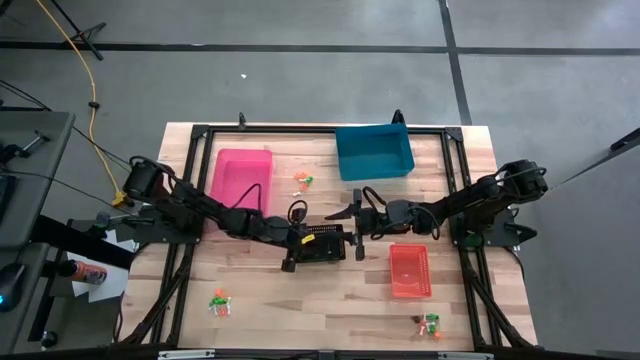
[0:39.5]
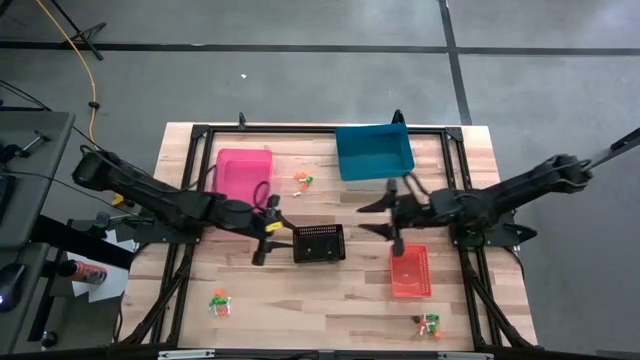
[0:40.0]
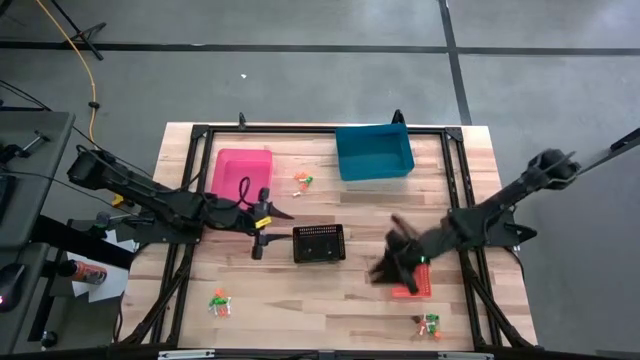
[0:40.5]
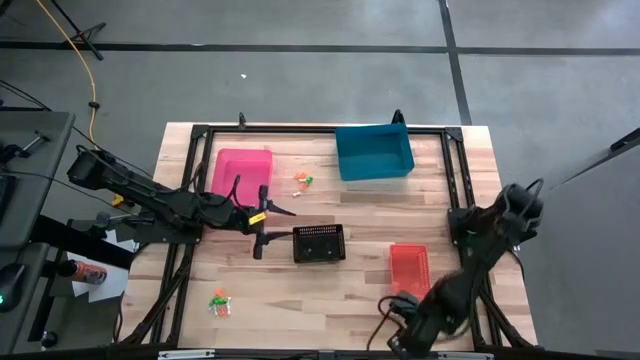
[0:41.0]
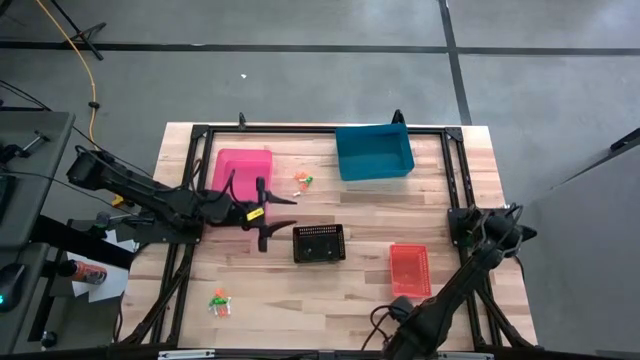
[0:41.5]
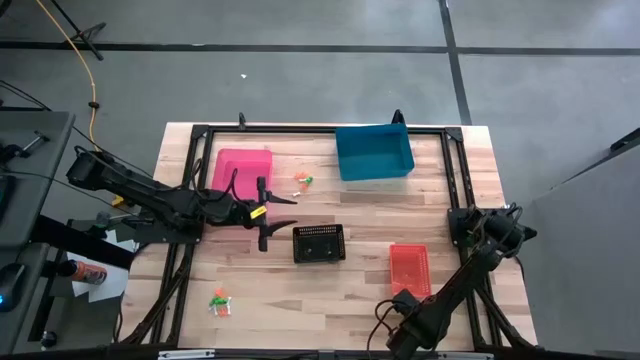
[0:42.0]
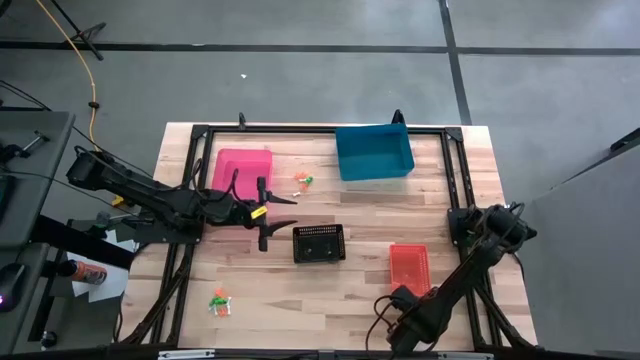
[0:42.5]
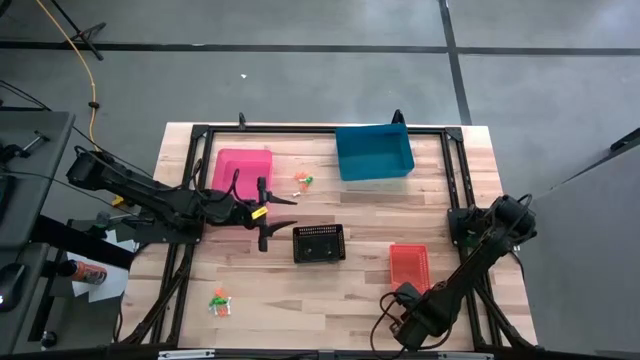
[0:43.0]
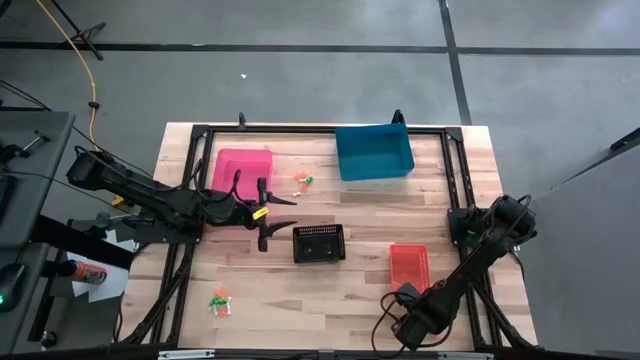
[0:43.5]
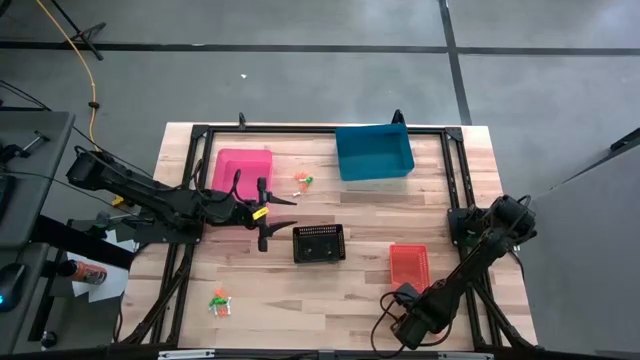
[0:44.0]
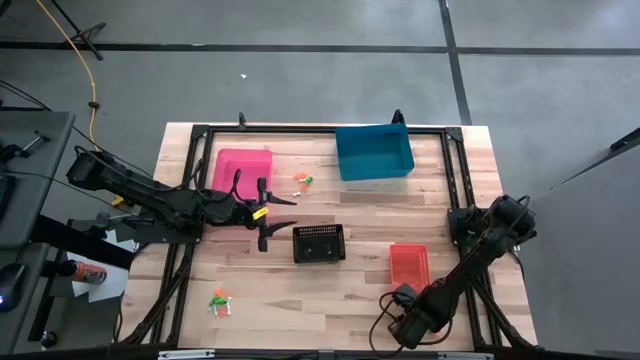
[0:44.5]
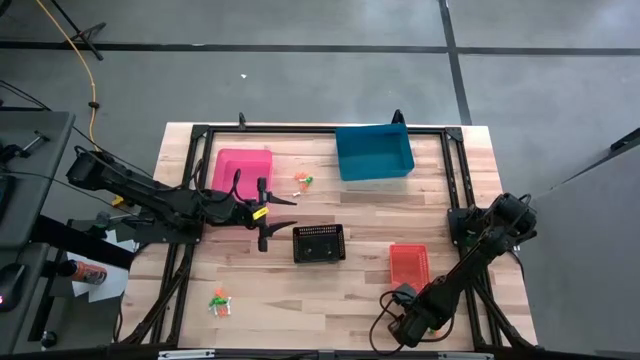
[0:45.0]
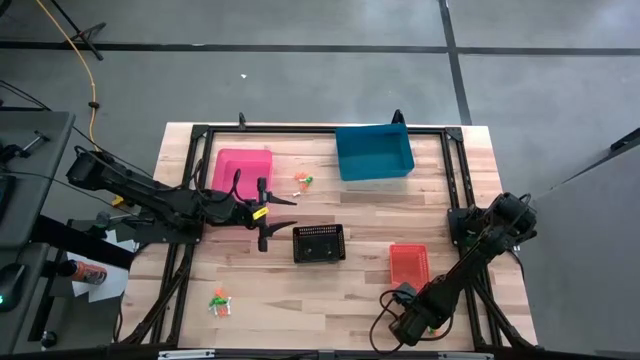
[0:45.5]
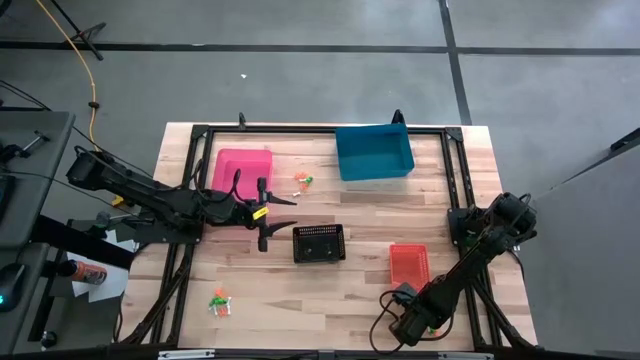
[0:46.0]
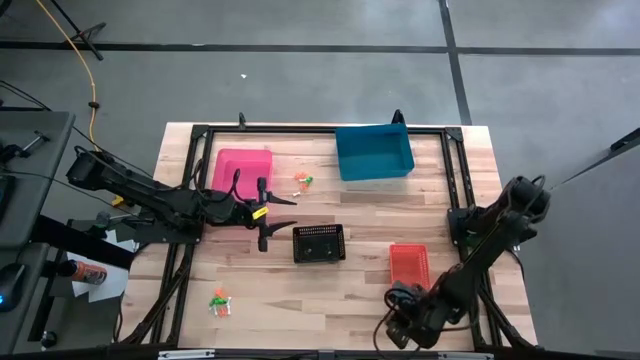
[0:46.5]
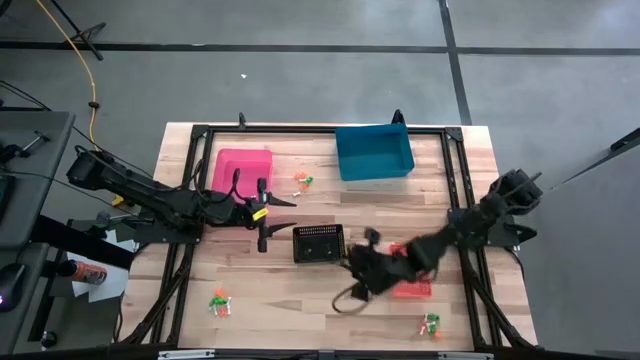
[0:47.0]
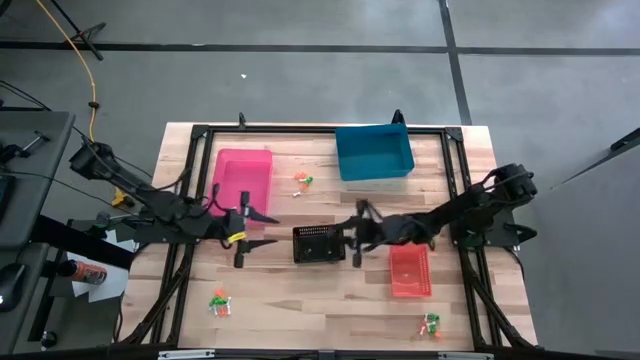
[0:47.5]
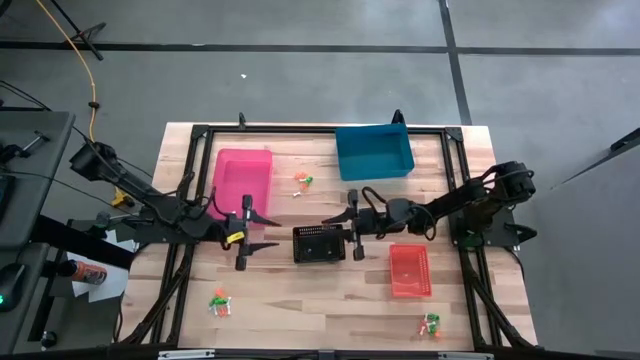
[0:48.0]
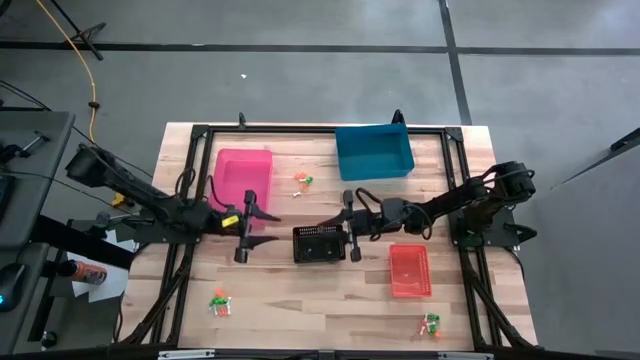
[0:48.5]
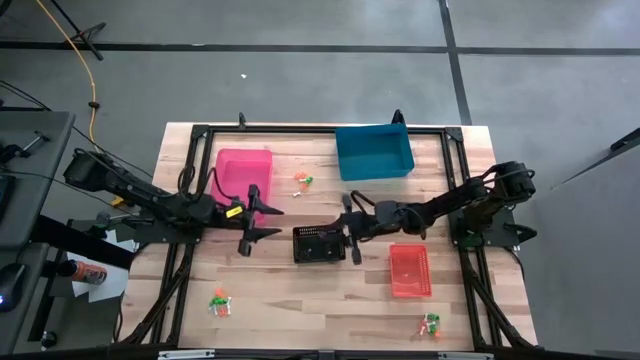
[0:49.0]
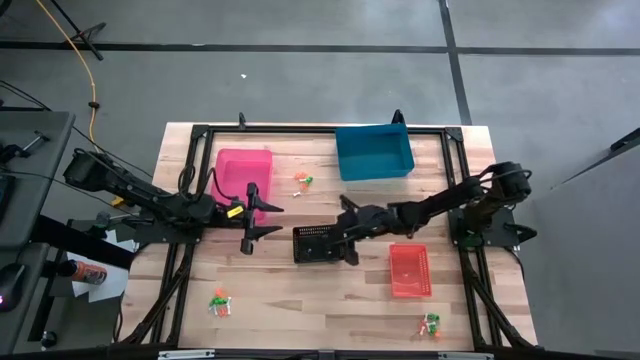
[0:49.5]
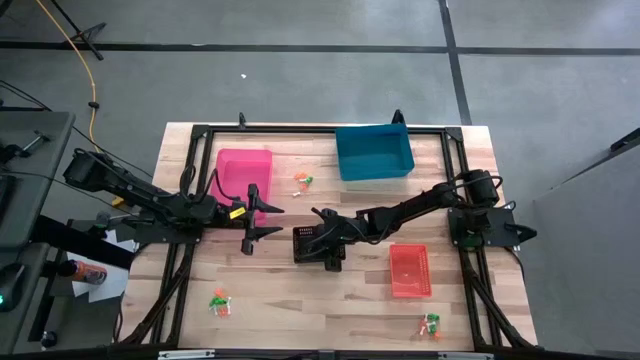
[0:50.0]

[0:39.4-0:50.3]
Task: Sort Halloween decoration
Put the black skull toy into the black bin

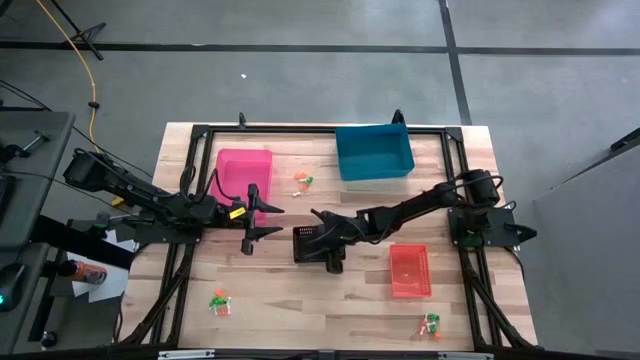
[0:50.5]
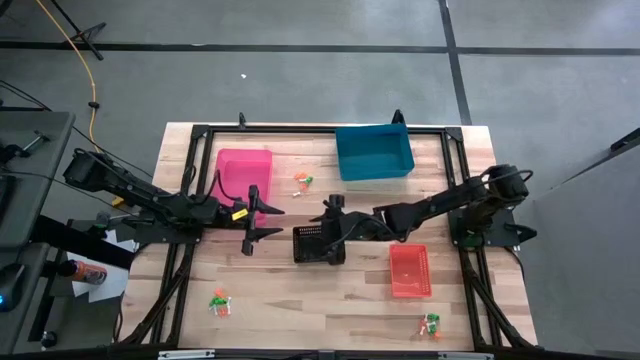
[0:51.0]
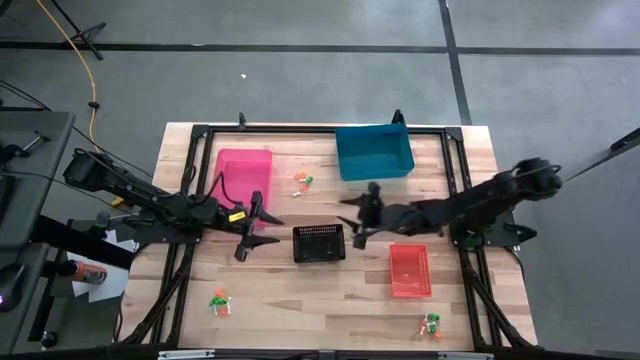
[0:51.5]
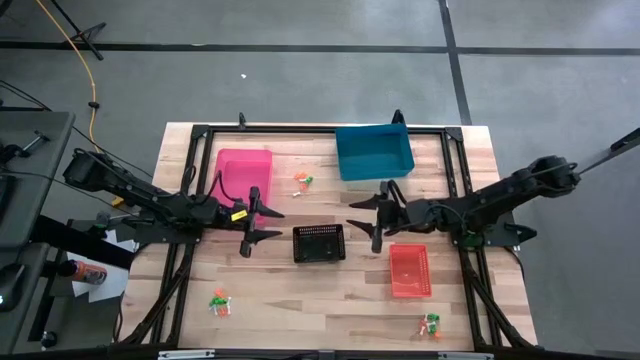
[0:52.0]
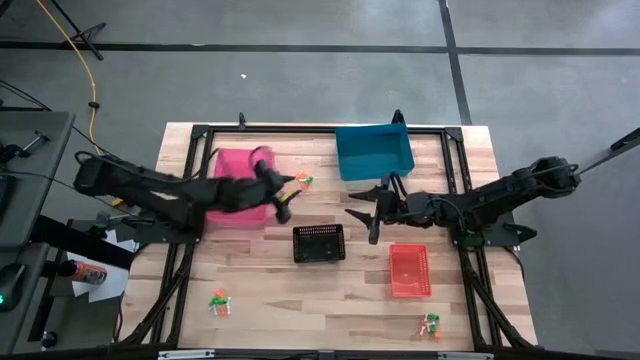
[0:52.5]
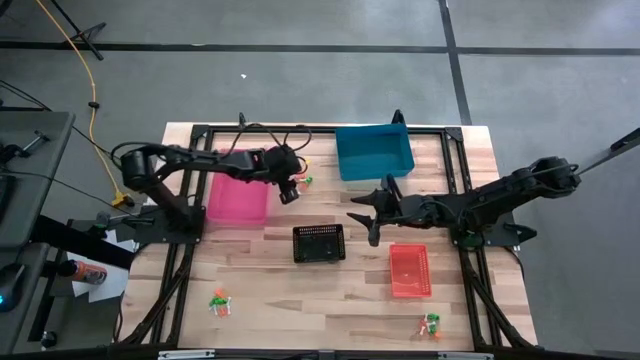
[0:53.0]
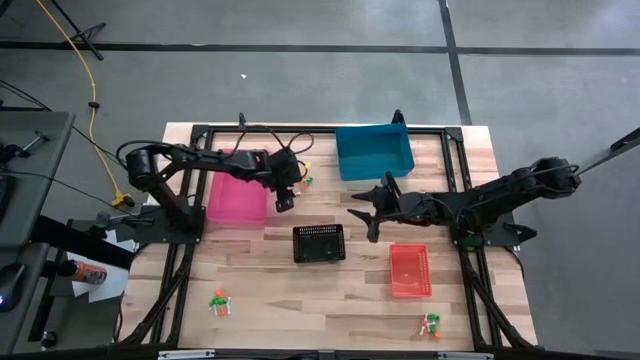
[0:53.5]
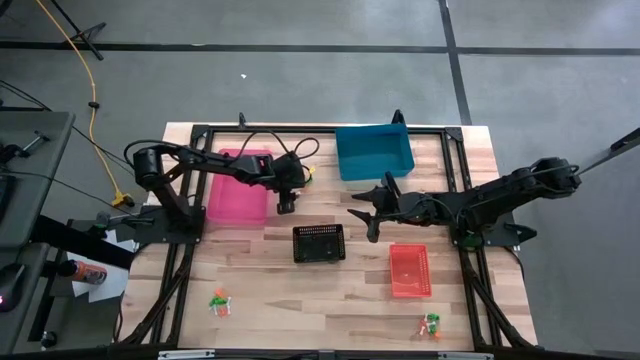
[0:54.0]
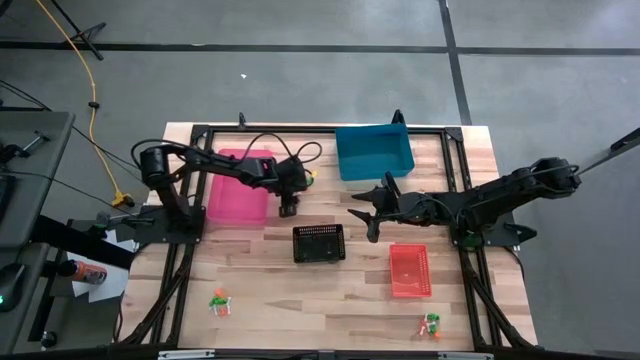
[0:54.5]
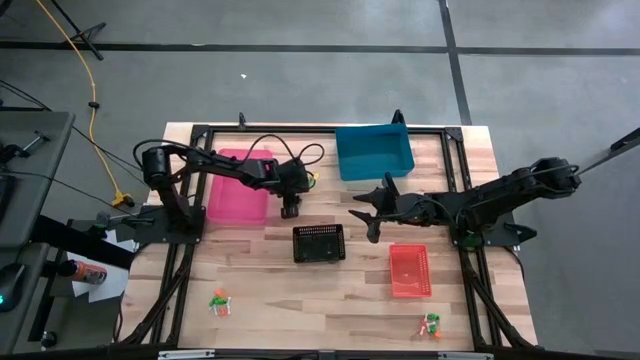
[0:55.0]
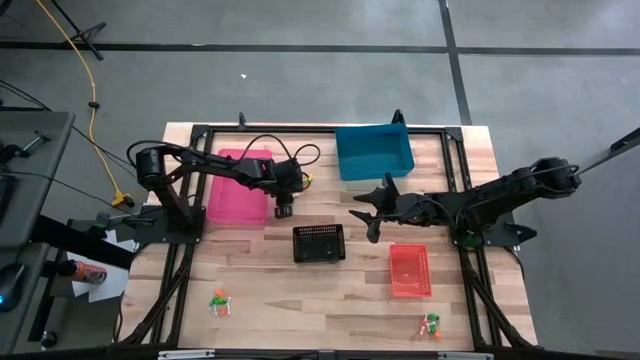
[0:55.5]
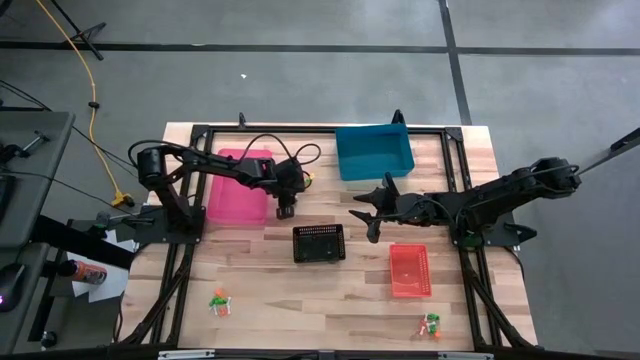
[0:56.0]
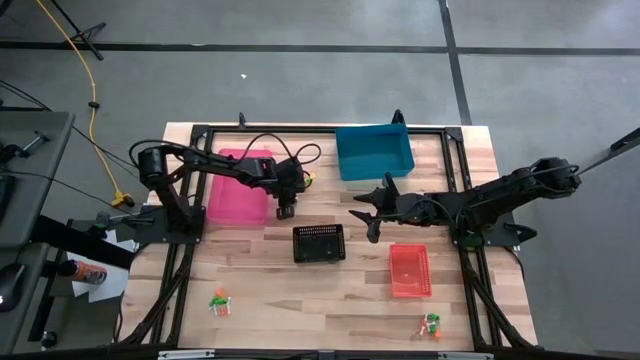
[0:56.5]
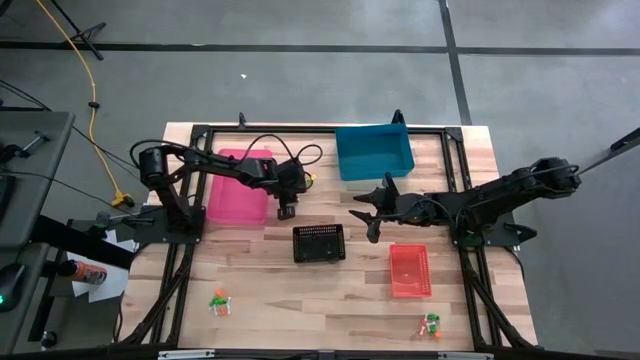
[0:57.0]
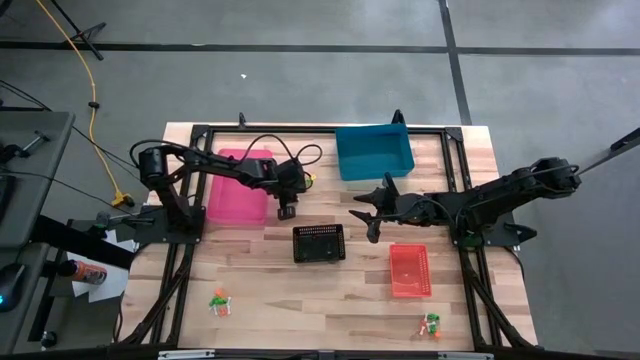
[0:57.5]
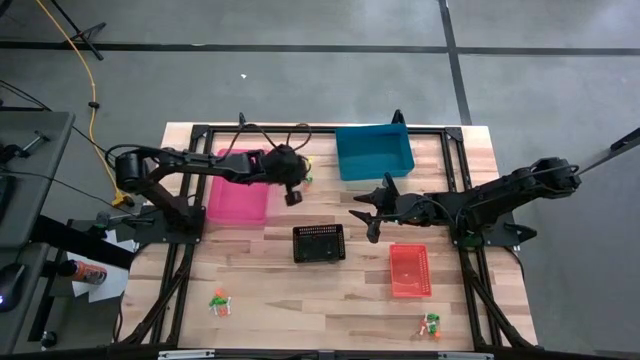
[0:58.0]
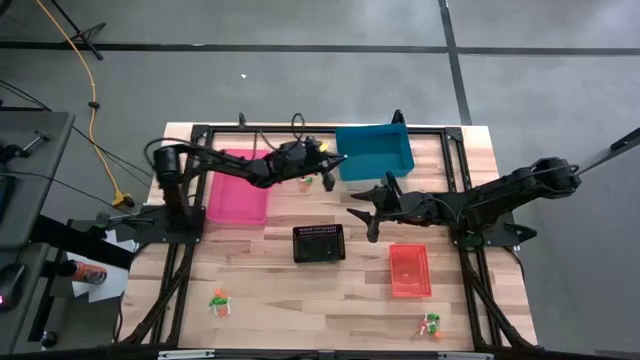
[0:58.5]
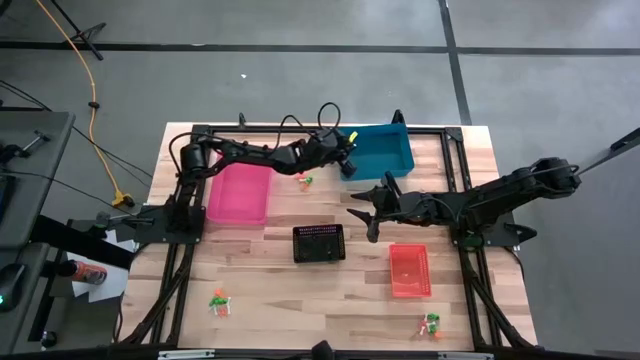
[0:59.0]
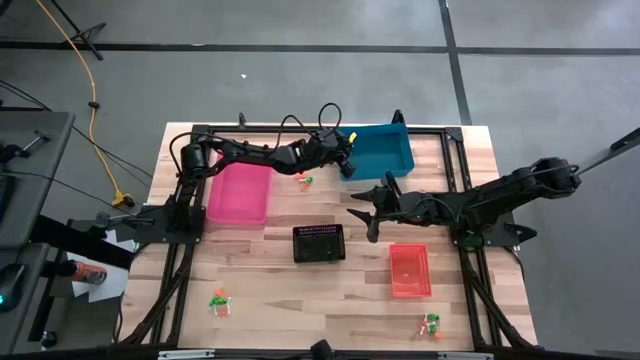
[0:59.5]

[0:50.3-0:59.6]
Put the white bone toy into the blue bin

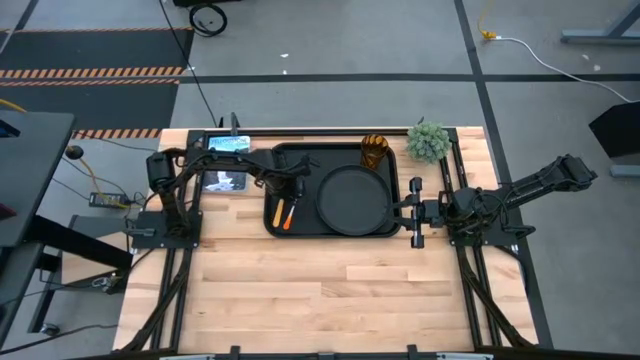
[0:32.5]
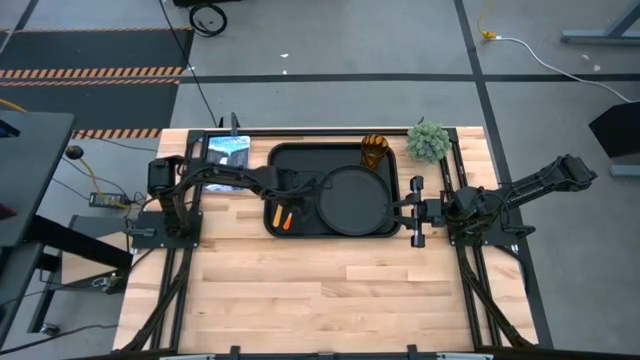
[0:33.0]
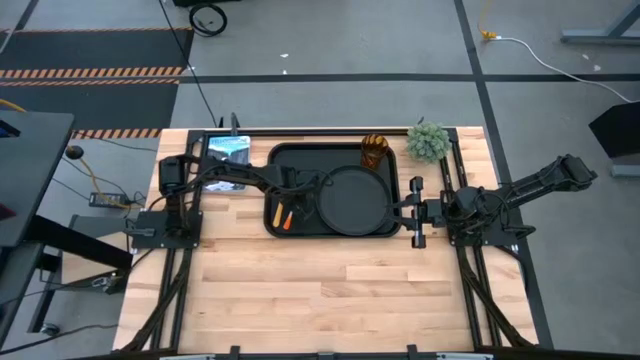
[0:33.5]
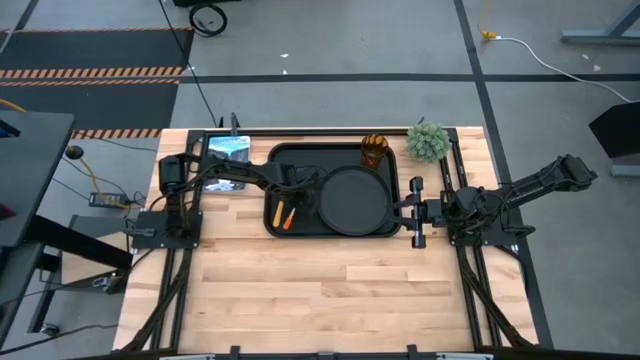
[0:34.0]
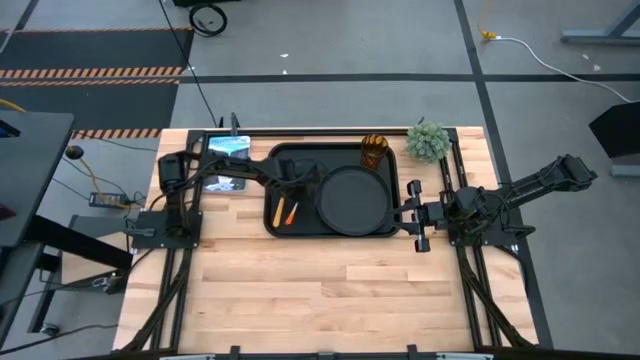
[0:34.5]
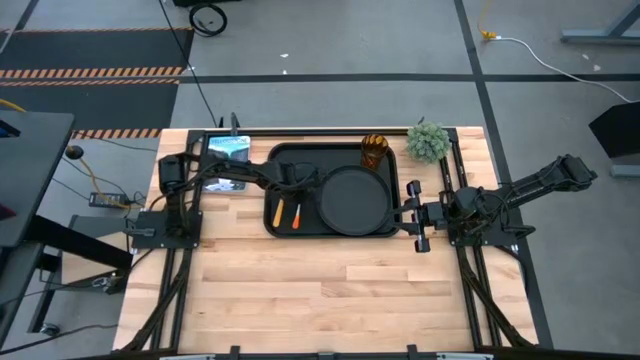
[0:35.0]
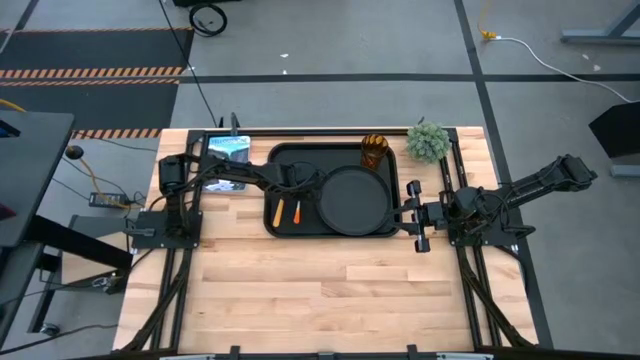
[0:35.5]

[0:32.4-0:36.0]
Task: Pick and place plate/cup/fork/spoon on tray
Adjust the orange fork on the table
